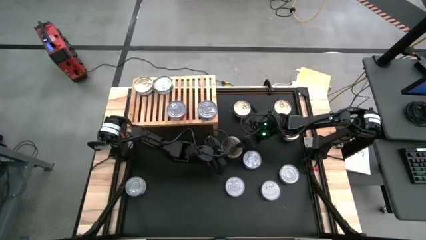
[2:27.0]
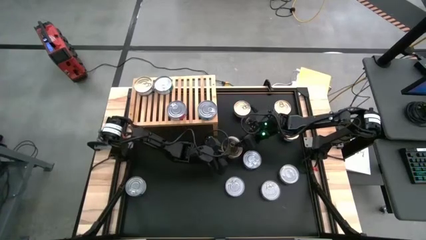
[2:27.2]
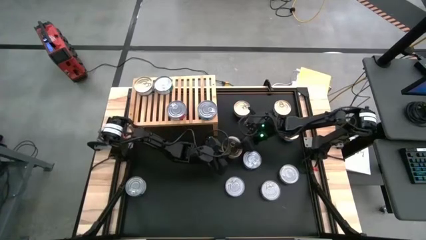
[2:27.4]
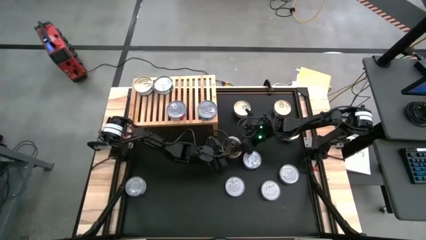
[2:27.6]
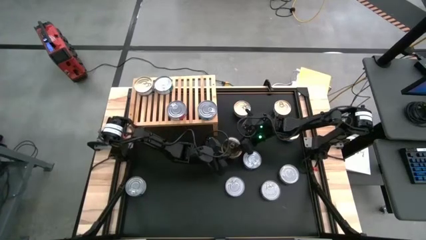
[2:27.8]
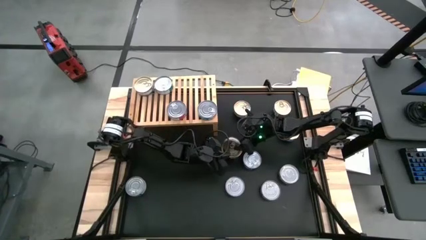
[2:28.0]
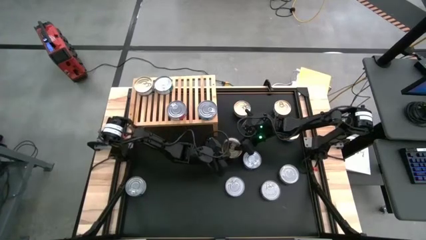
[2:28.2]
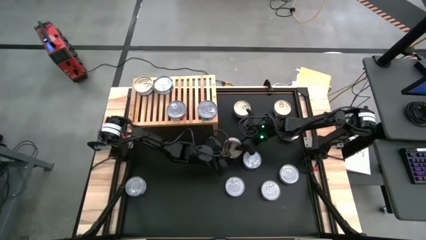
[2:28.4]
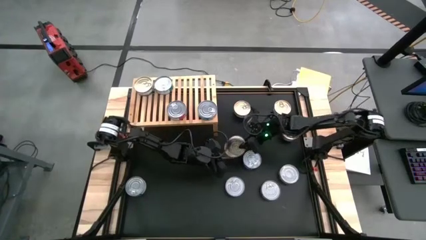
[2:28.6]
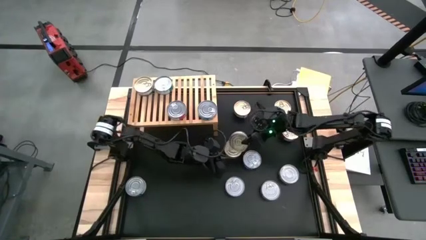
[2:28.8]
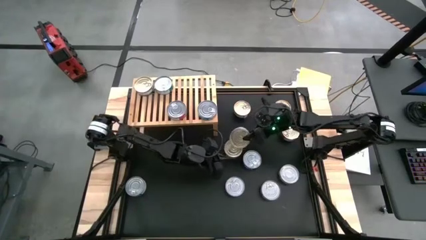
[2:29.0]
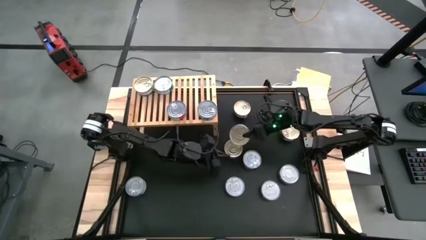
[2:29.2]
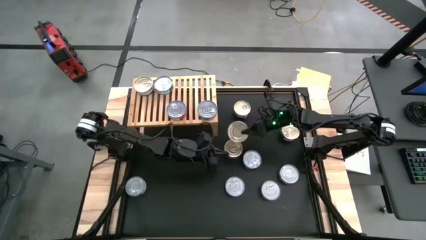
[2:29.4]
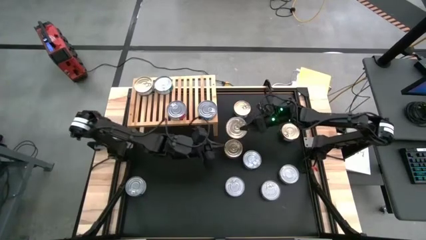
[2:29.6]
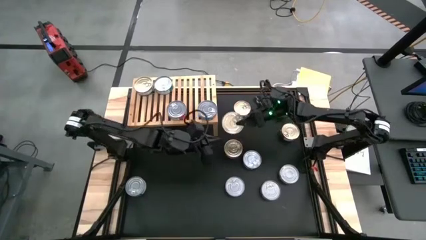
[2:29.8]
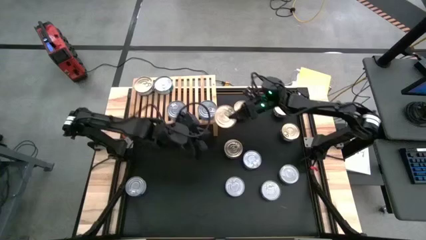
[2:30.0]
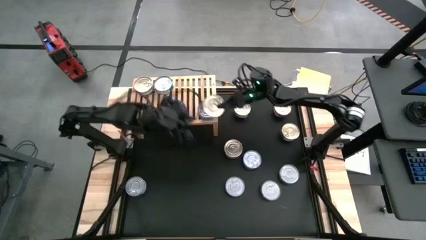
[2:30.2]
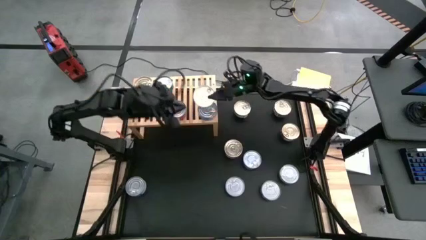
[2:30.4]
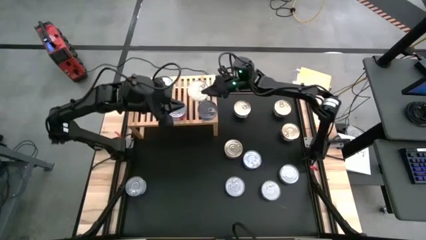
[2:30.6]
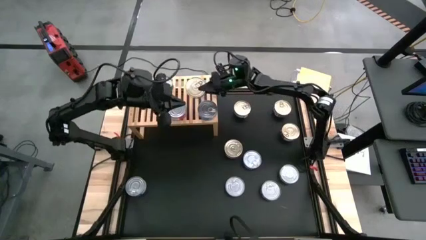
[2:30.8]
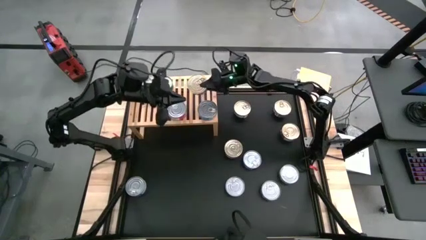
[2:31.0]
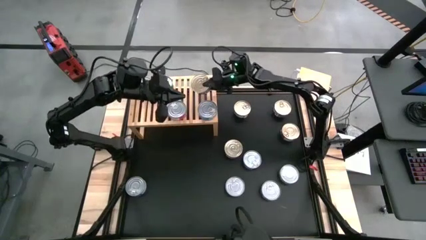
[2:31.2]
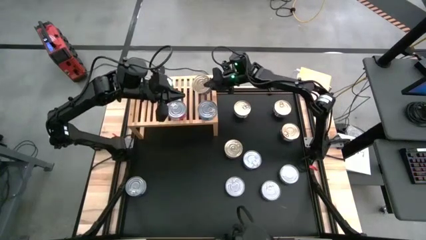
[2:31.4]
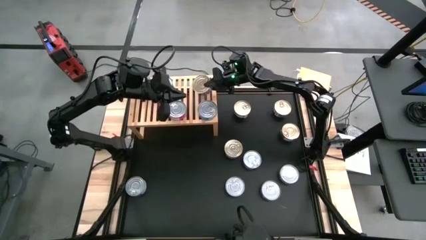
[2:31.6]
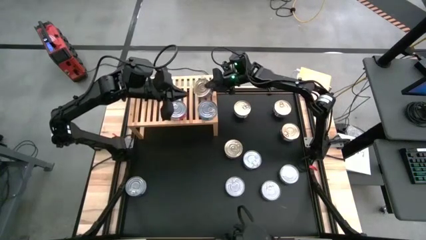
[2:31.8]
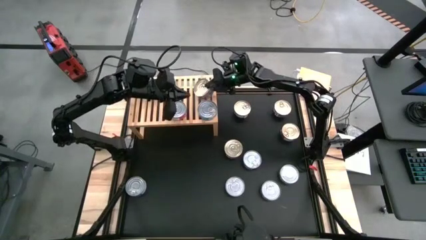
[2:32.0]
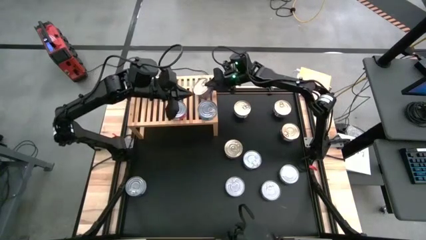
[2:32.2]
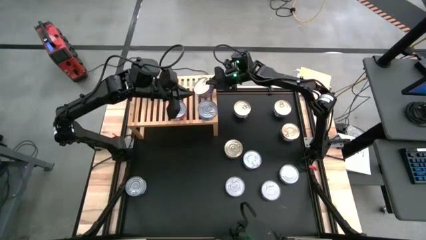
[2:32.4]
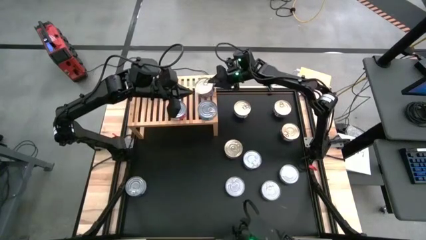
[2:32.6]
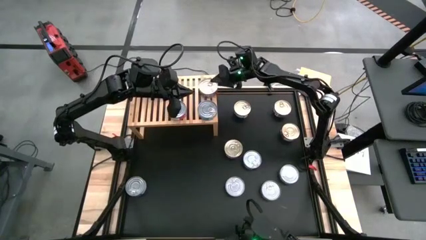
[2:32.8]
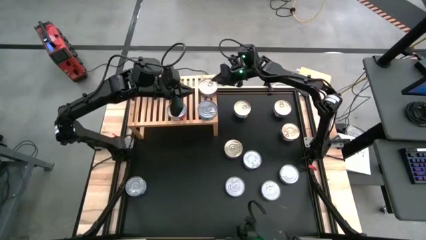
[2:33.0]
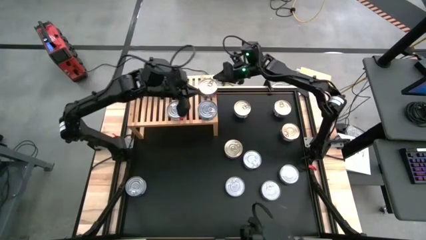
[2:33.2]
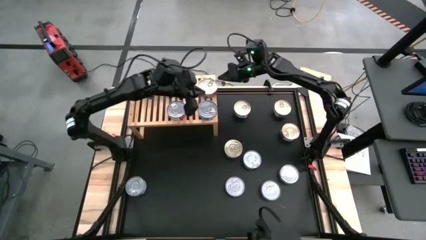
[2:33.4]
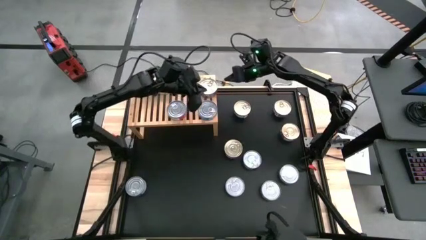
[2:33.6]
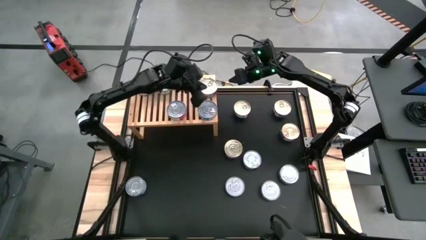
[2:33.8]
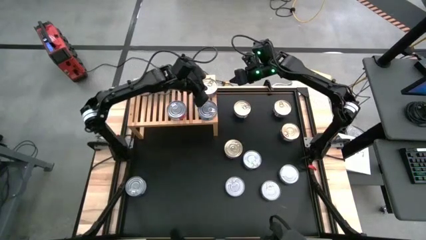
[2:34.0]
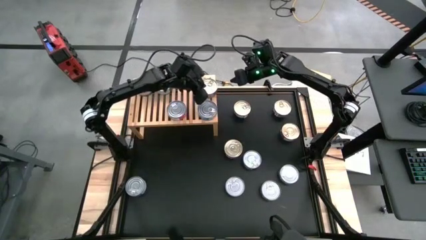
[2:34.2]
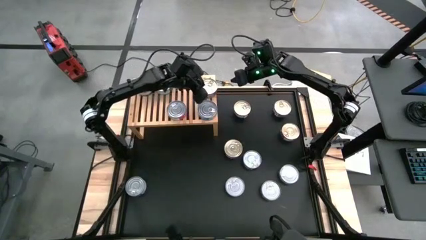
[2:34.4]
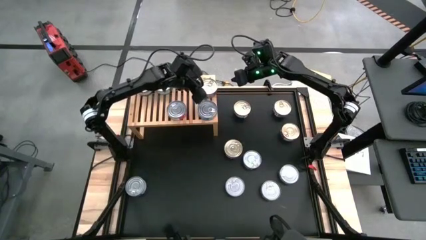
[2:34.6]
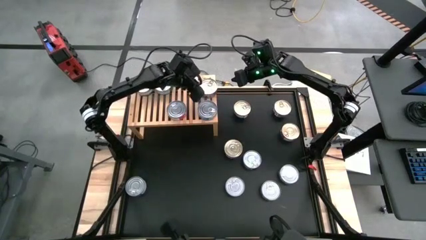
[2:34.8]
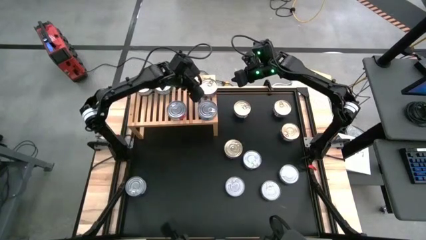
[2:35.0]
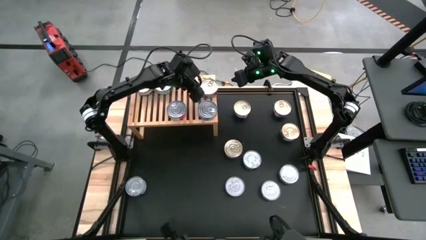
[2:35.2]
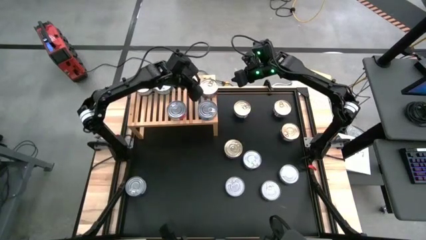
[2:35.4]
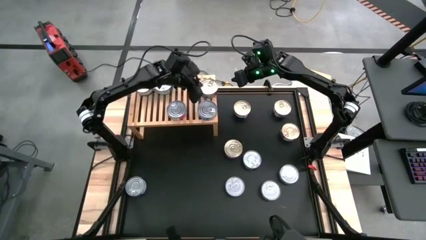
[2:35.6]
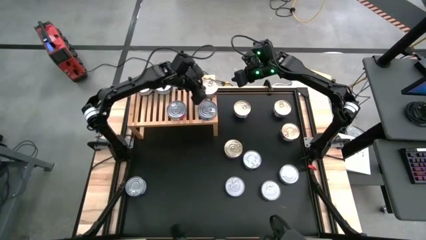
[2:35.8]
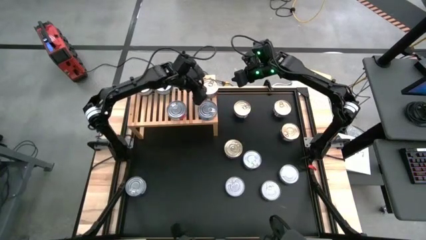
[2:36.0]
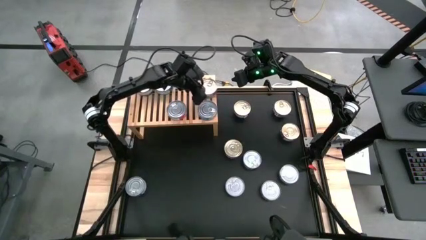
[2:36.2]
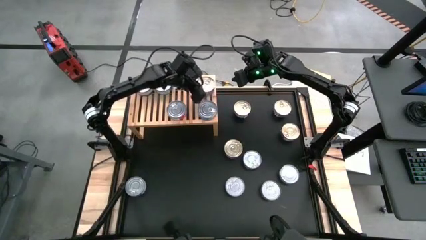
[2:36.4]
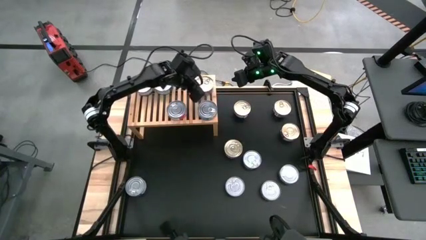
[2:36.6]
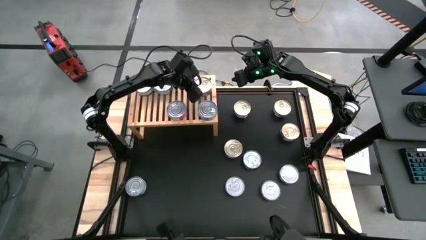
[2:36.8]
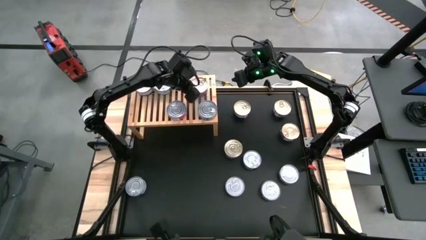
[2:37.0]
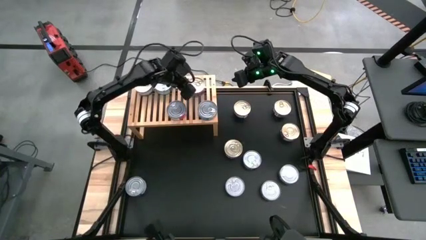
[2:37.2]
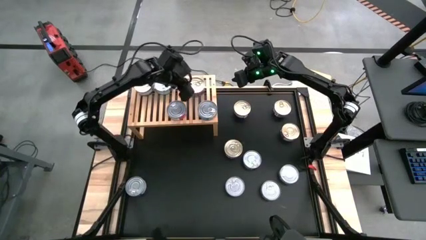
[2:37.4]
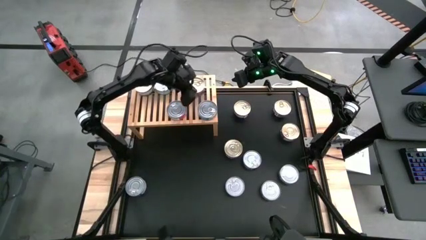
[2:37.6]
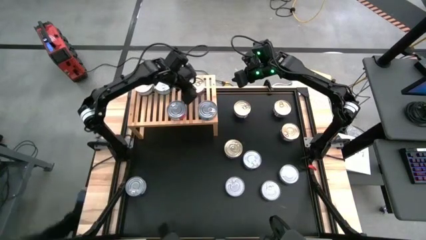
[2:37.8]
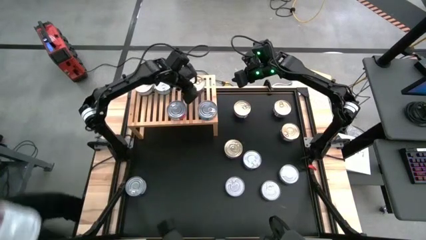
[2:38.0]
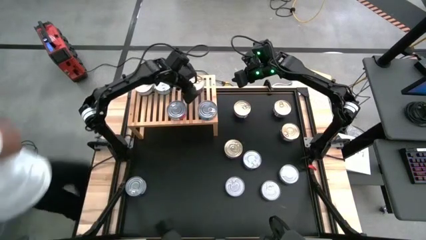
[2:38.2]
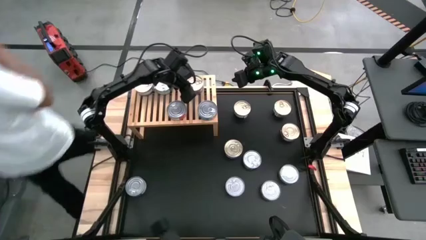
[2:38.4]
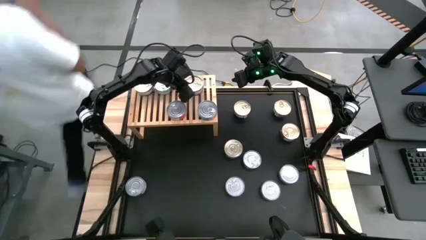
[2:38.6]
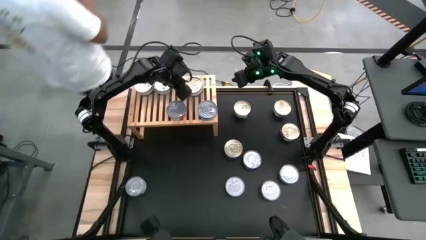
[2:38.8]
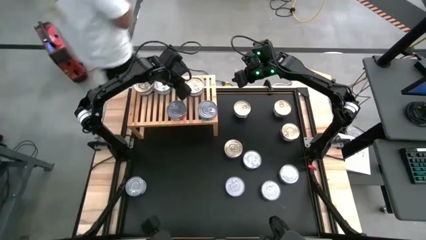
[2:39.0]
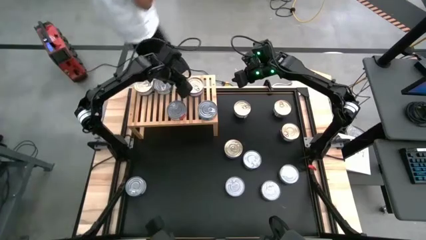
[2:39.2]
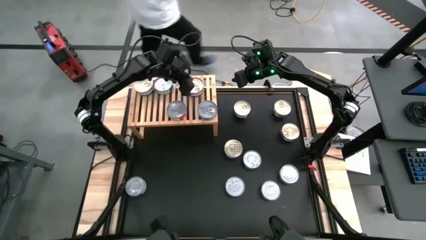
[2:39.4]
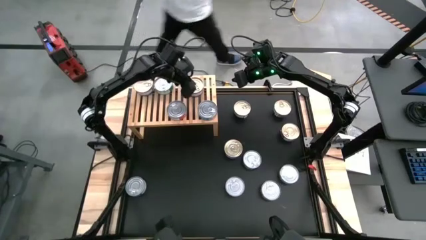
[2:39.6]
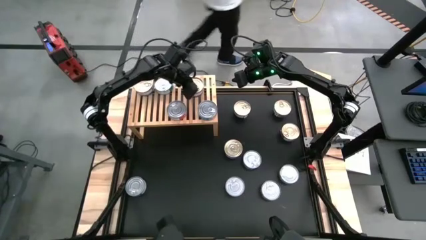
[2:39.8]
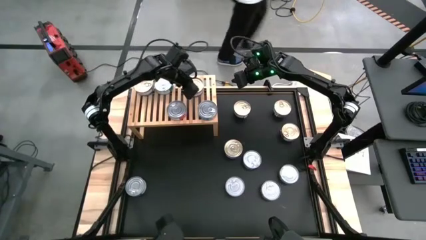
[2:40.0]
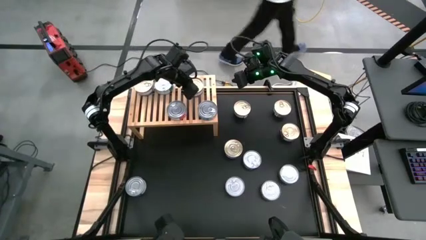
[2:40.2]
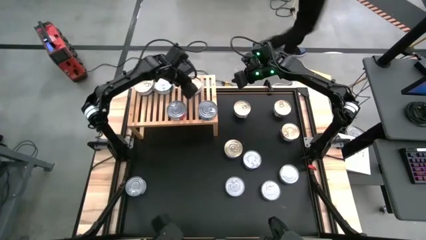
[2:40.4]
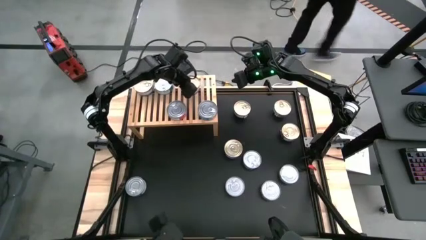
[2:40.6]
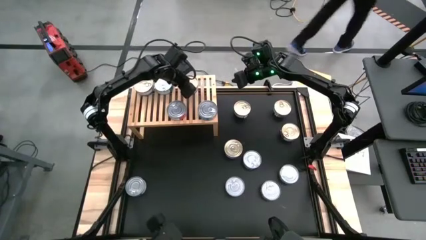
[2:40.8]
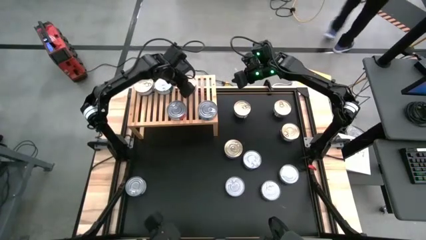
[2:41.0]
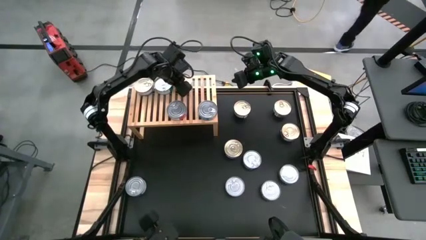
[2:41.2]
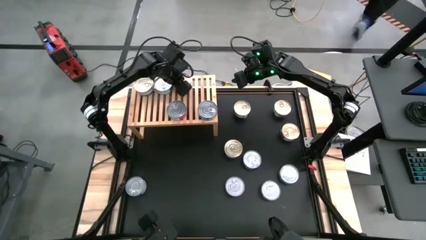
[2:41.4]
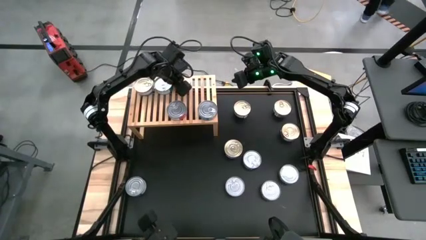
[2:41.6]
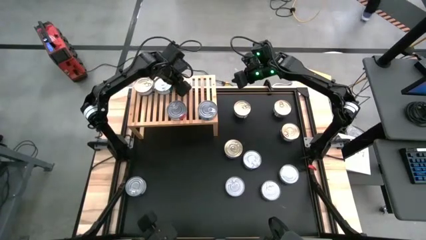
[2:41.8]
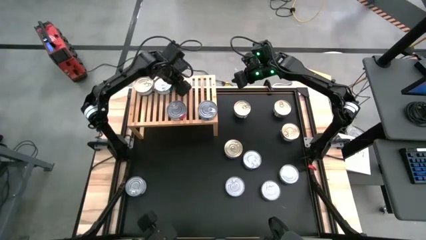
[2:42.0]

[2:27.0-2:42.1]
Task: Stack canned seafood by type on shelf
Put the blue pink tuna can on the shelf
